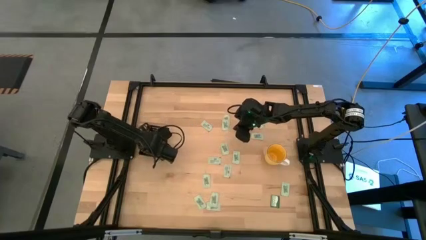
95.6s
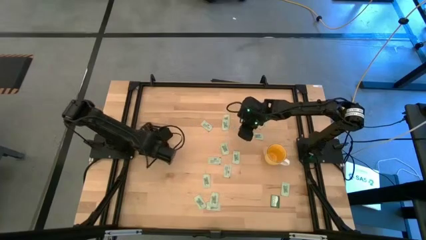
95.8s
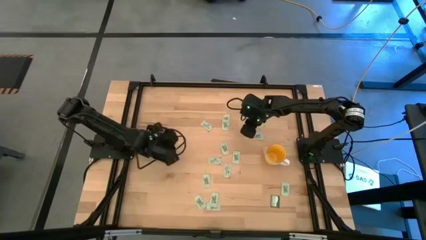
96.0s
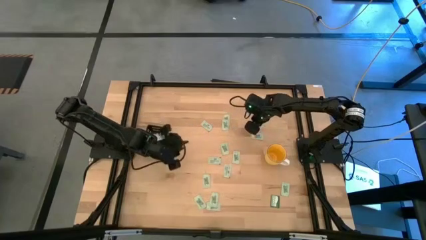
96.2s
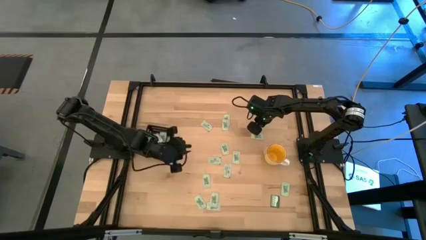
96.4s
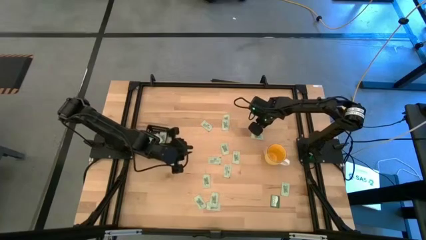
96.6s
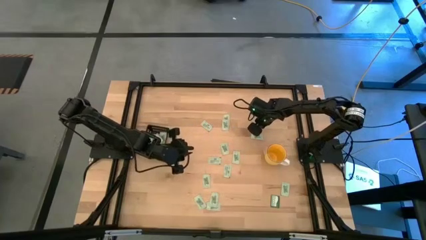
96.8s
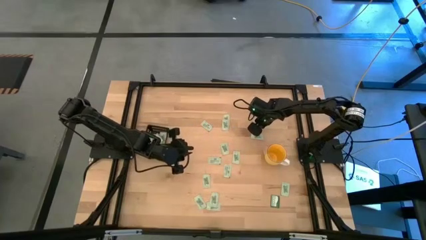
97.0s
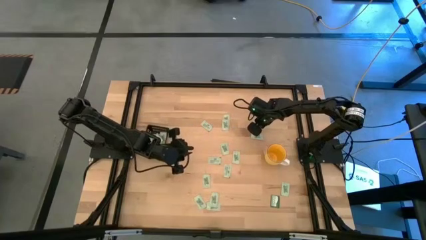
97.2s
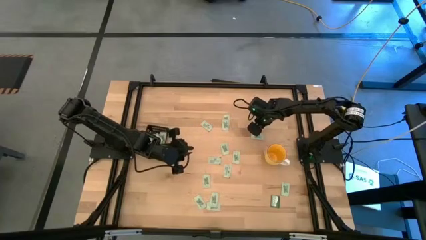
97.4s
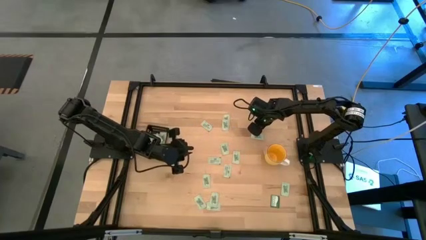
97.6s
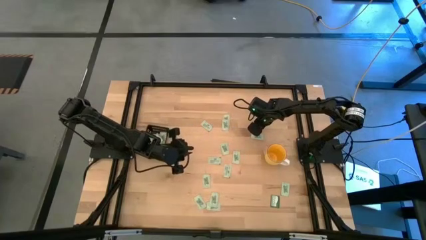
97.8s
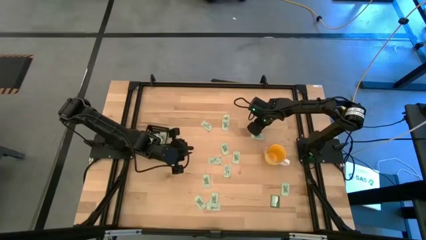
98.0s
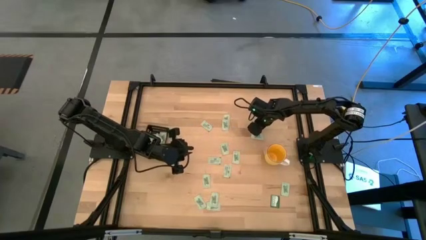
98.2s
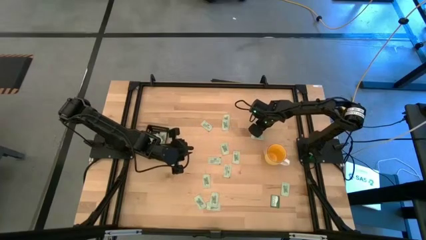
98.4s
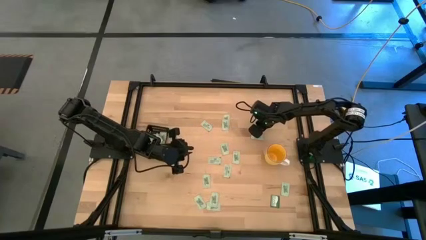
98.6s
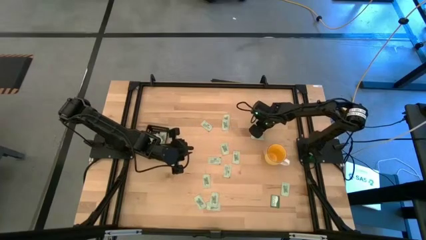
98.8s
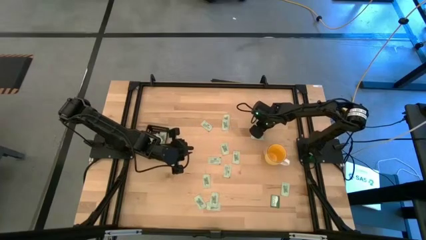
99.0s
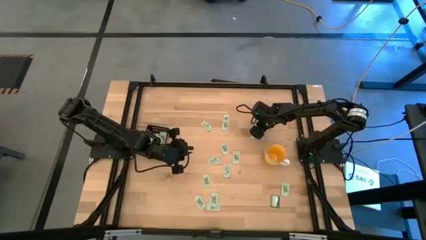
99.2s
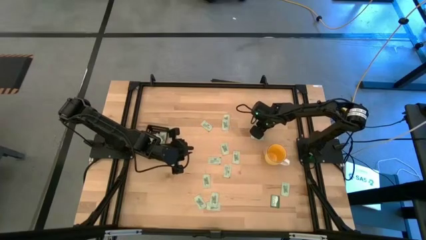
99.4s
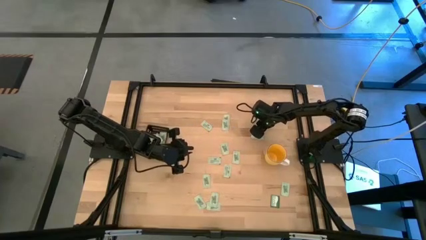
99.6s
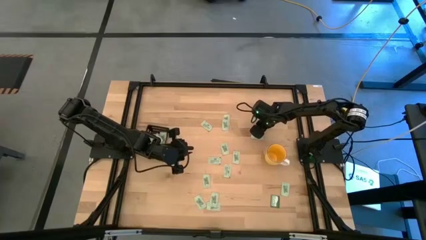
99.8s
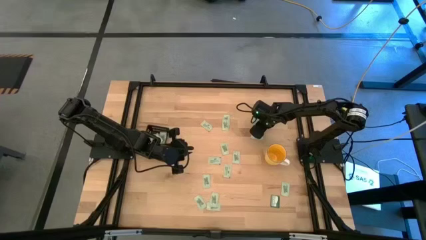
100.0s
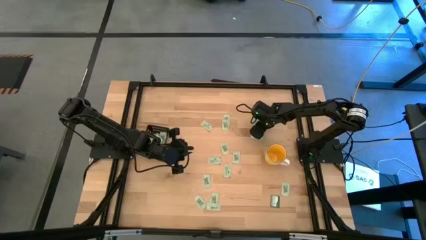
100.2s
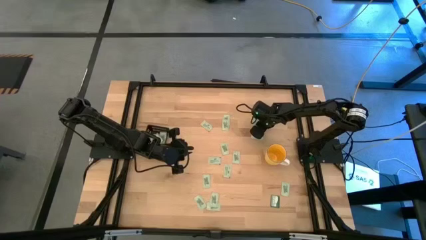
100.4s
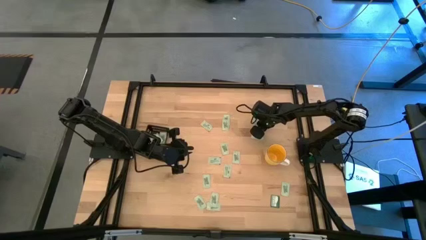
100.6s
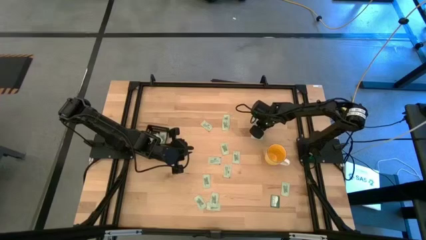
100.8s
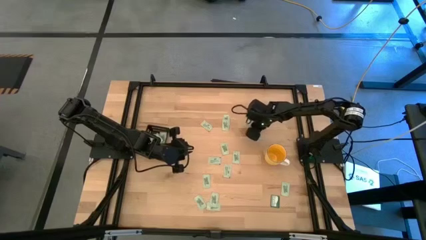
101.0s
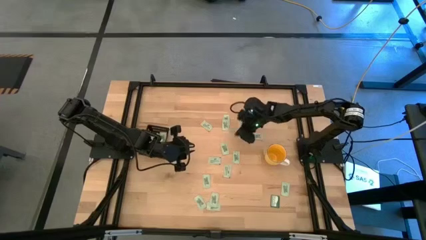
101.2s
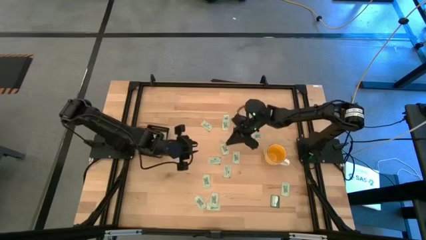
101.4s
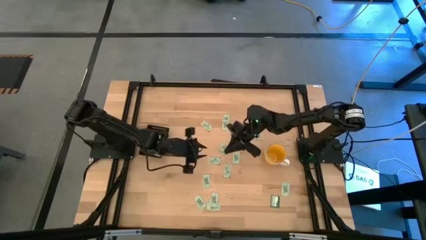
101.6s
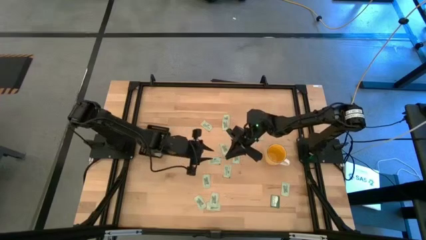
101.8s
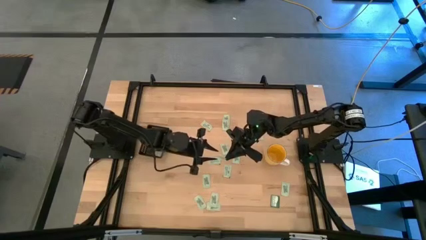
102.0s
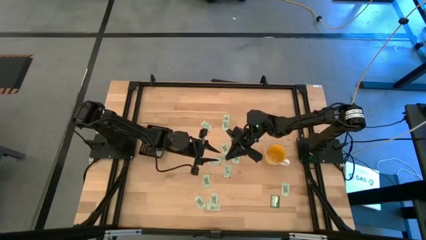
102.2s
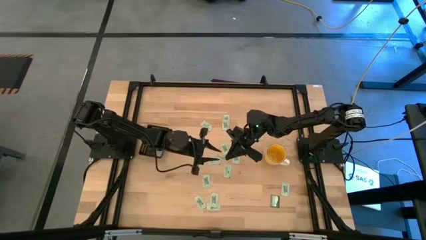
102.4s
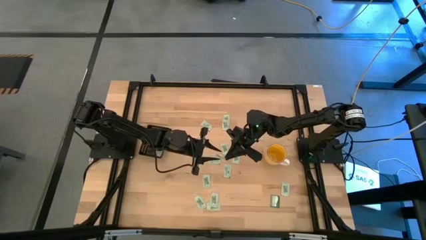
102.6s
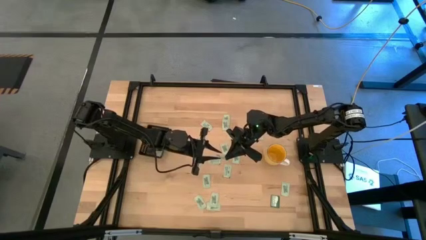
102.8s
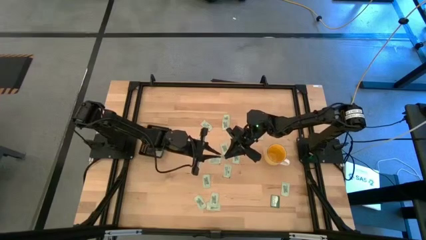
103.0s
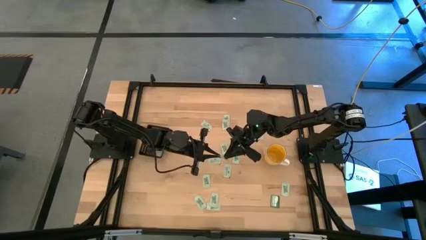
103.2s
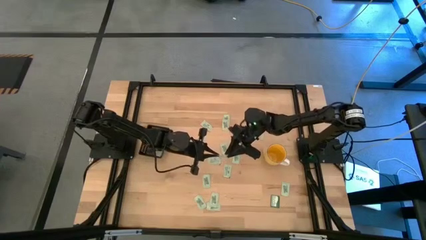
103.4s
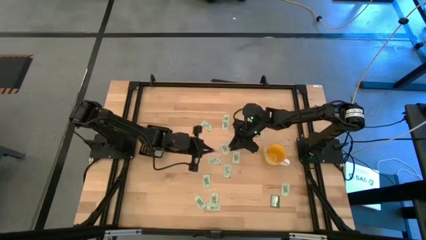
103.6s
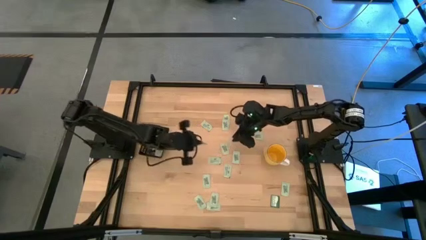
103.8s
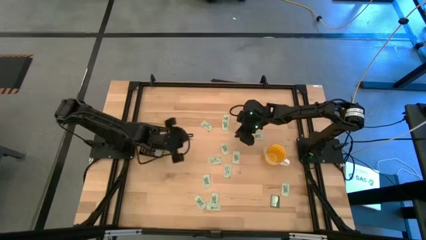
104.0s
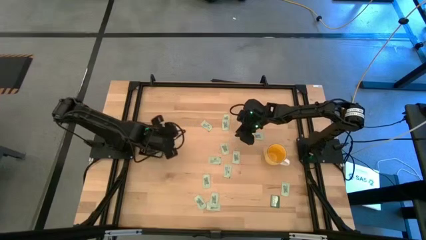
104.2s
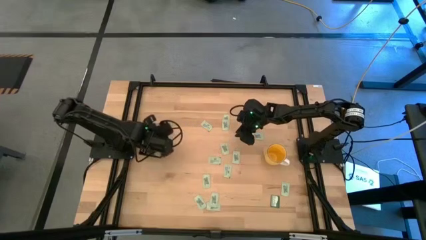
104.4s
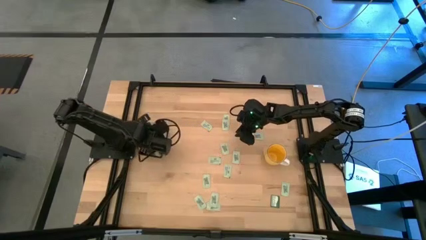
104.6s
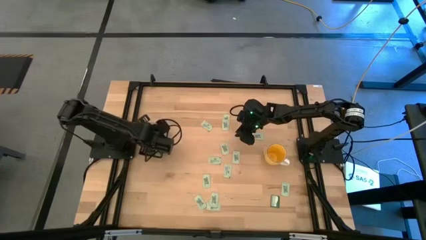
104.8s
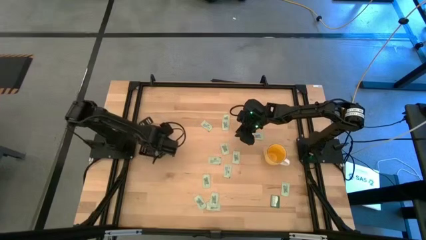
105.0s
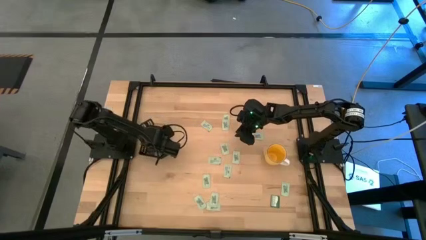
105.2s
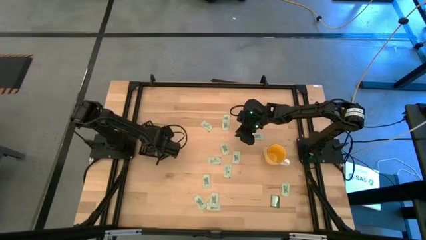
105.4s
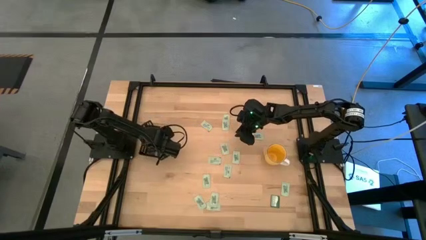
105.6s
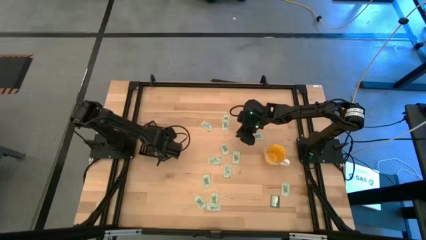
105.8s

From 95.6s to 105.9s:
Task: Pick and place Stevia / Truvia into bins
Put the stevia packet into the black bin

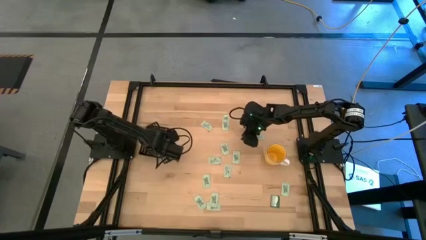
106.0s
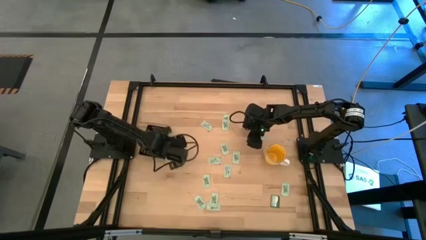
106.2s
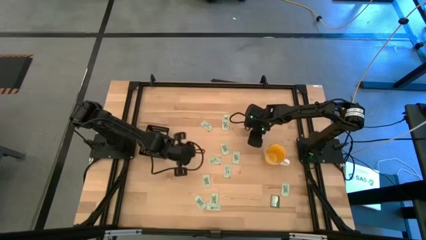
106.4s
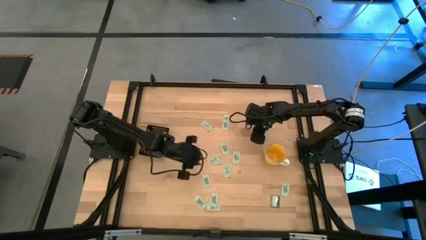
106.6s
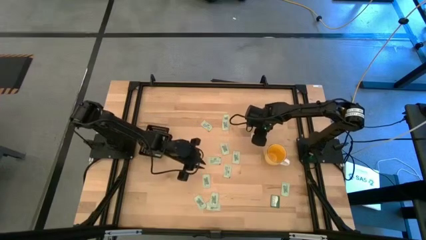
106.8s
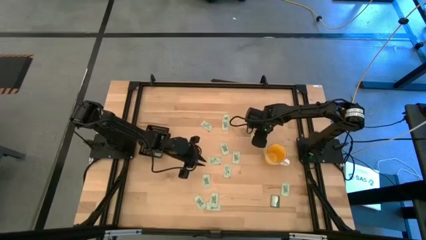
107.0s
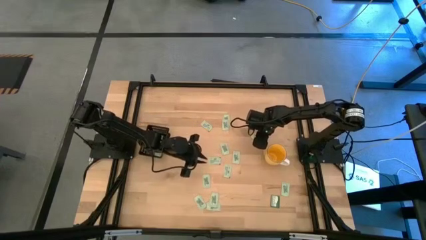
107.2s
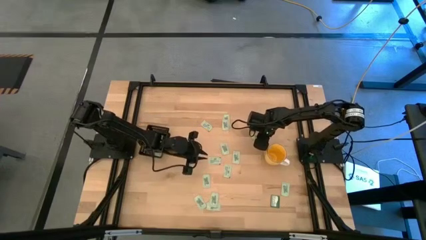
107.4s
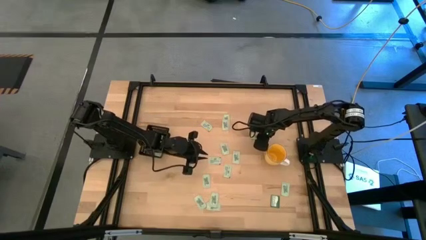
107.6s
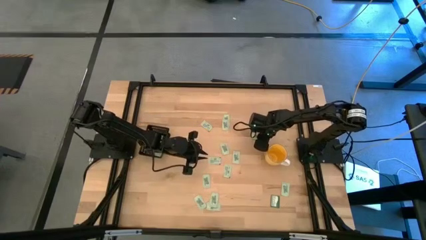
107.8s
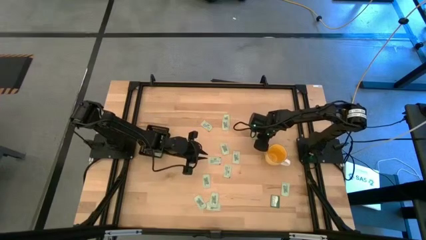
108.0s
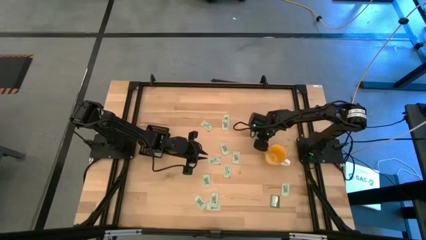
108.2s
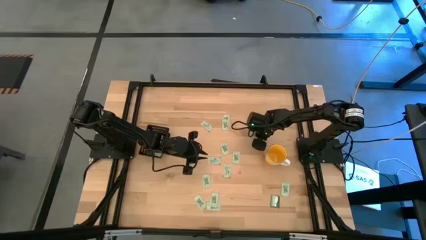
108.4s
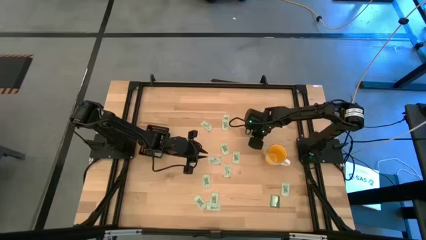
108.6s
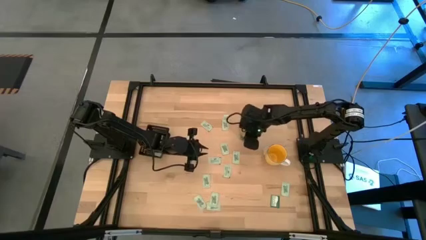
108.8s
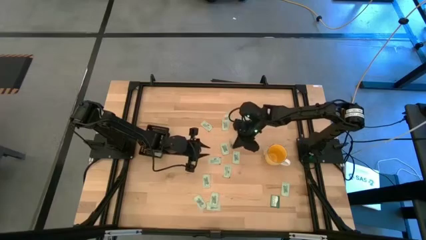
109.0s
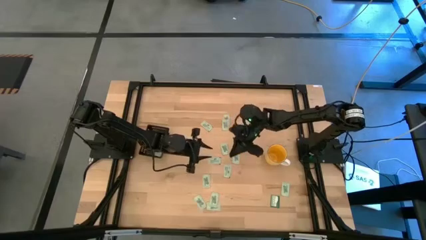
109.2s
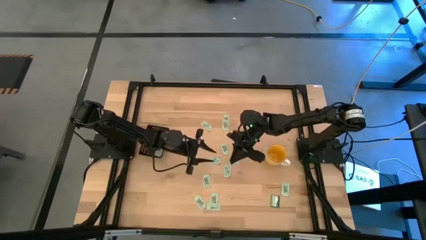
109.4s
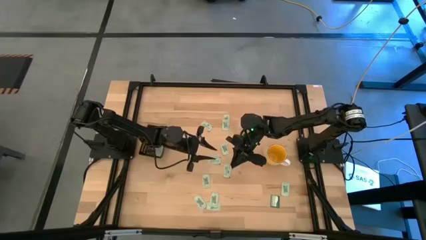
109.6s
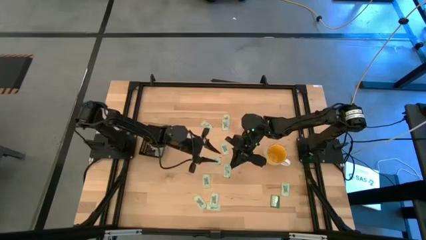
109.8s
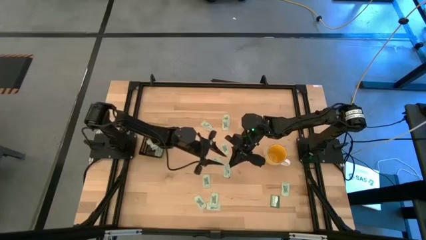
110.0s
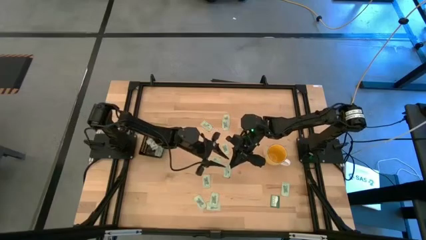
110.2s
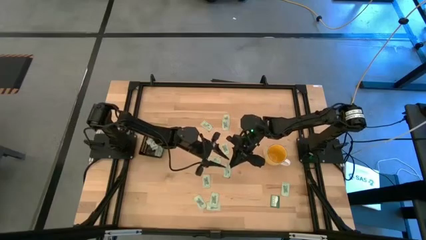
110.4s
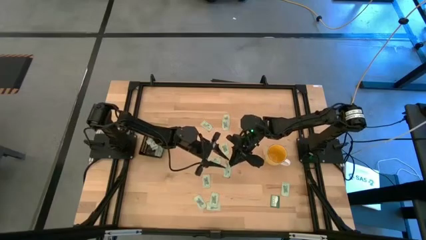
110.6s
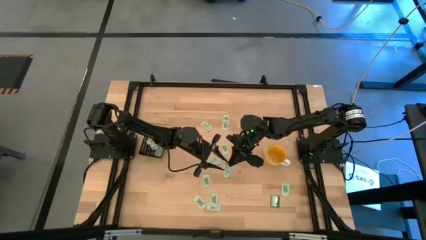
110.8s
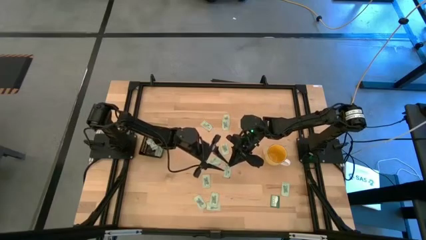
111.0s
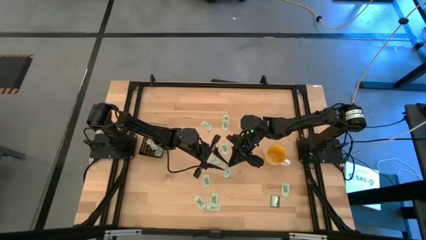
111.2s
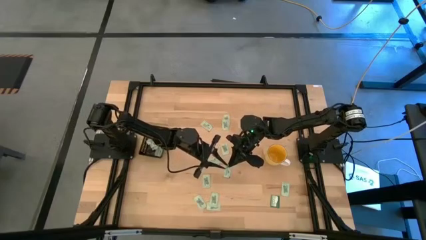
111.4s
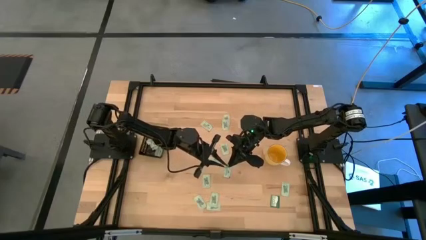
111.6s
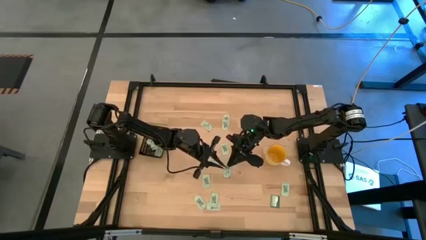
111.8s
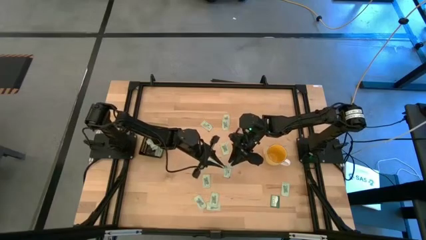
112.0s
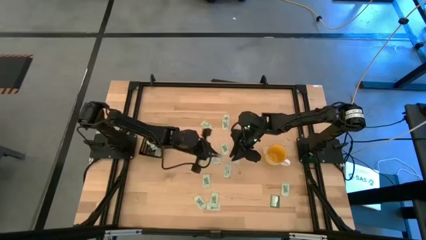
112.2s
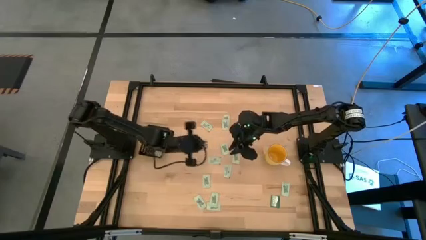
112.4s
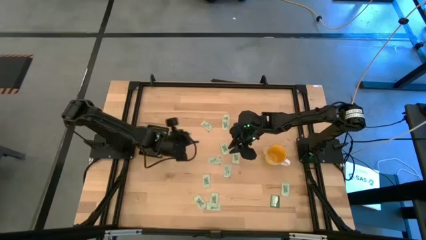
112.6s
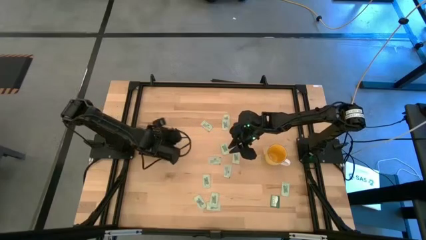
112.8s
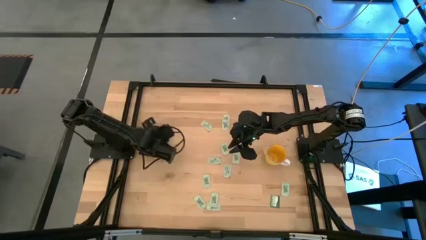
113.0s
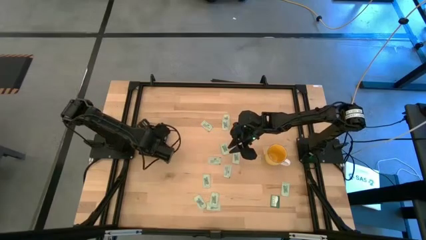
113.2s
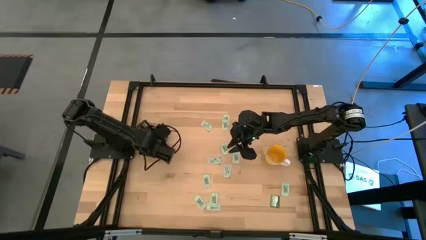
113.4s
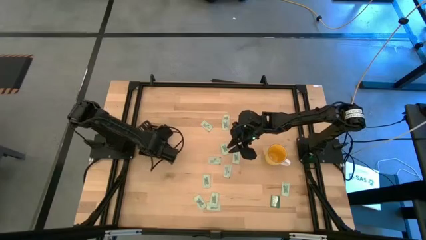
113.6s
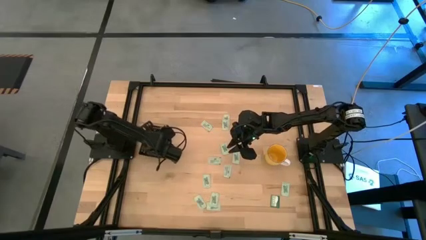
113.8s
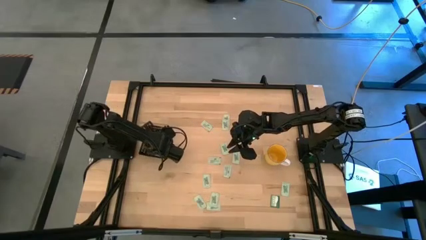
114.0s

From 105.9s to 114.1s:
Put the stevia packet into the black bin
